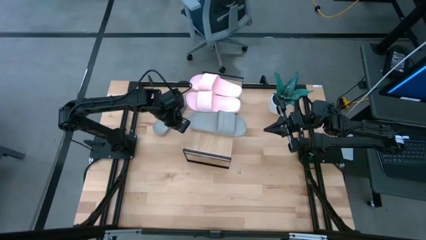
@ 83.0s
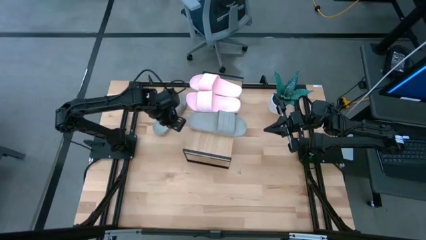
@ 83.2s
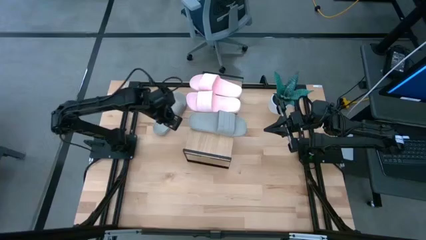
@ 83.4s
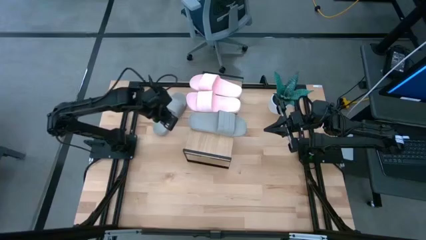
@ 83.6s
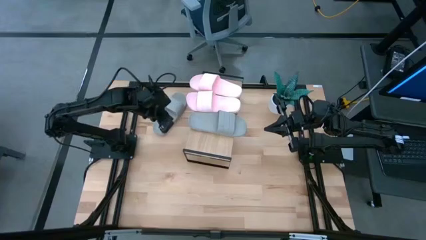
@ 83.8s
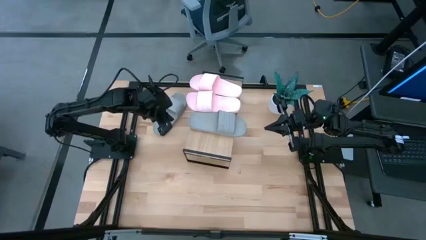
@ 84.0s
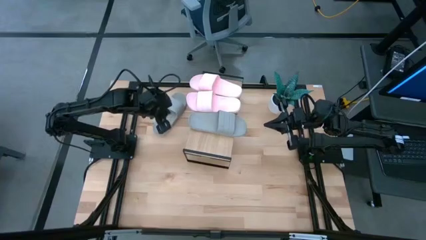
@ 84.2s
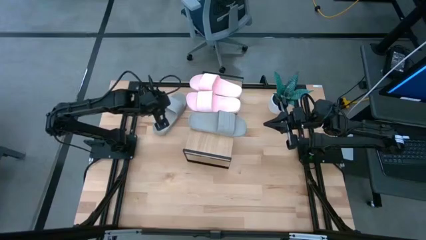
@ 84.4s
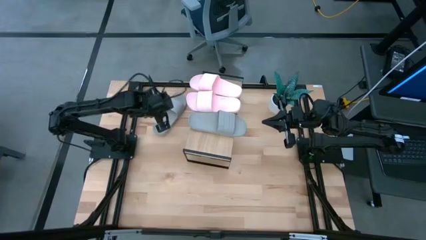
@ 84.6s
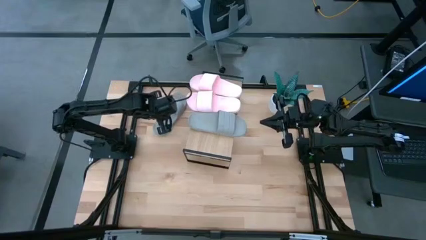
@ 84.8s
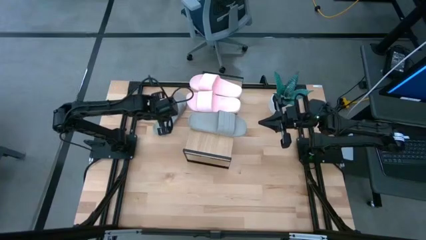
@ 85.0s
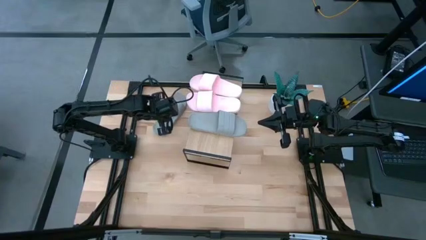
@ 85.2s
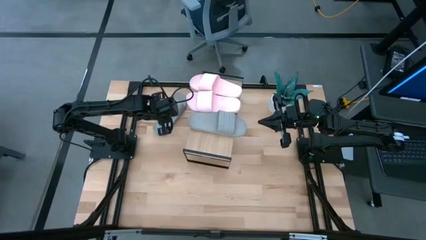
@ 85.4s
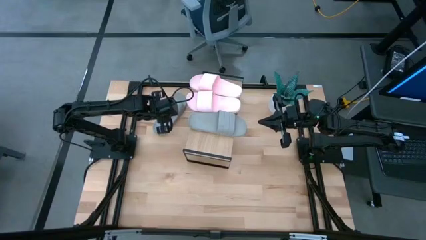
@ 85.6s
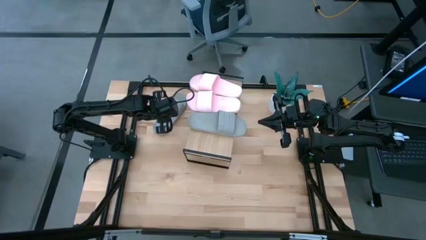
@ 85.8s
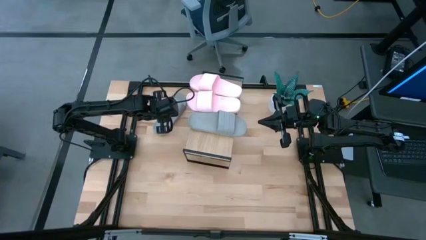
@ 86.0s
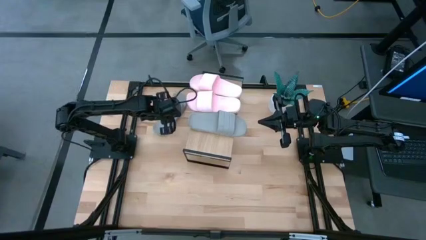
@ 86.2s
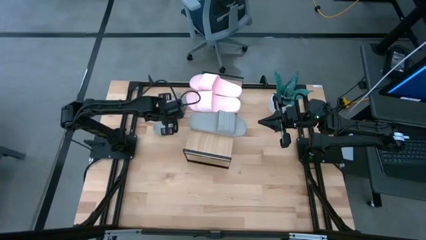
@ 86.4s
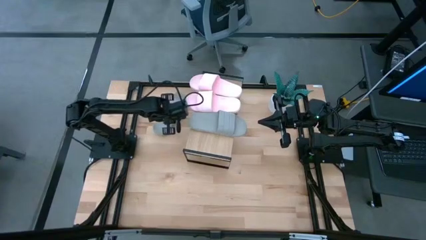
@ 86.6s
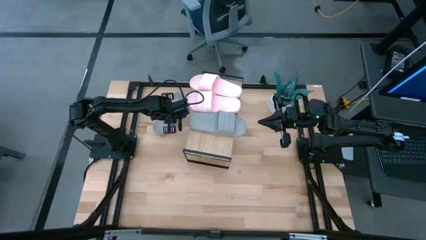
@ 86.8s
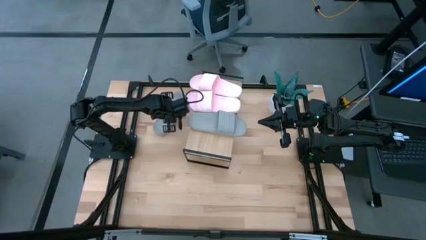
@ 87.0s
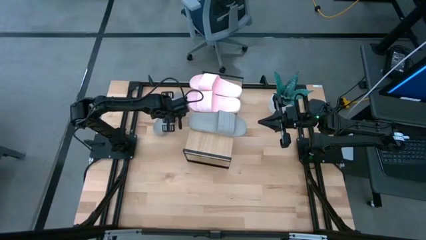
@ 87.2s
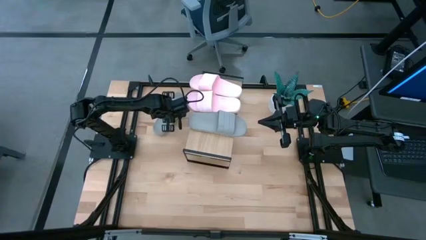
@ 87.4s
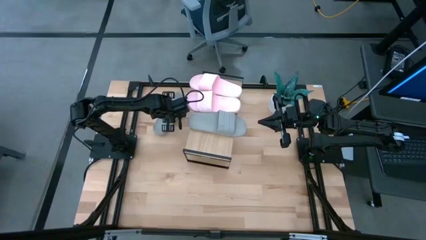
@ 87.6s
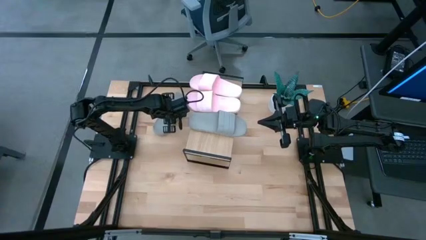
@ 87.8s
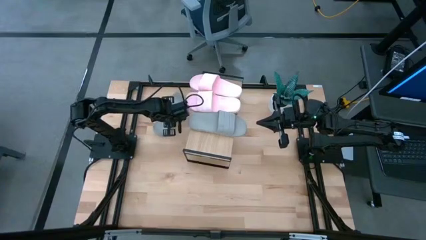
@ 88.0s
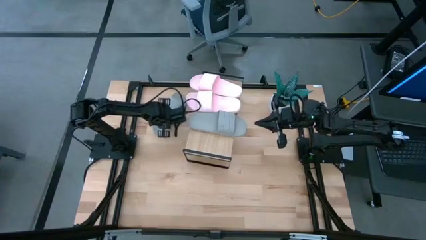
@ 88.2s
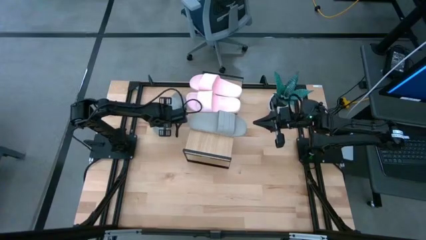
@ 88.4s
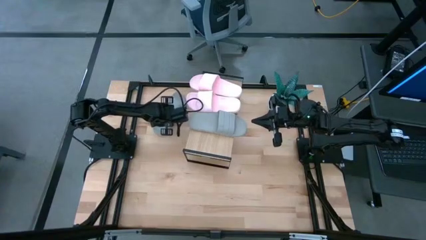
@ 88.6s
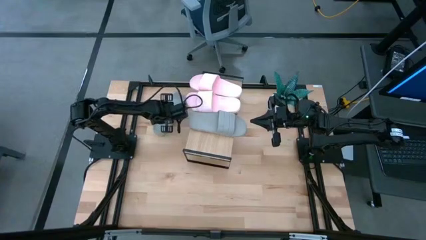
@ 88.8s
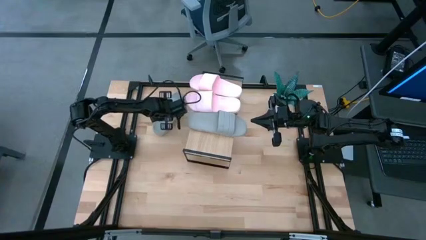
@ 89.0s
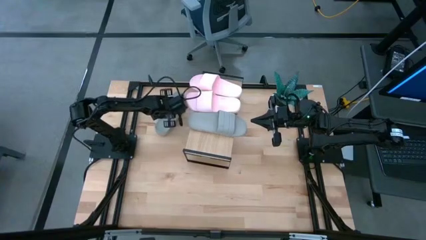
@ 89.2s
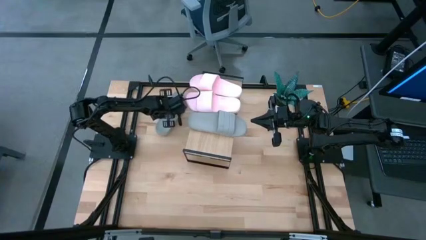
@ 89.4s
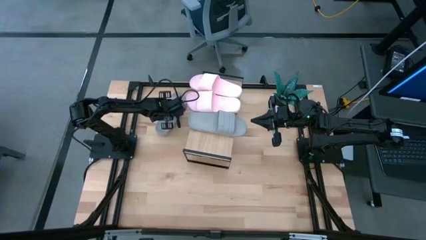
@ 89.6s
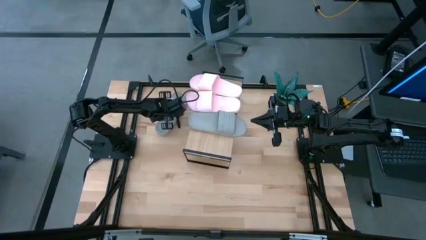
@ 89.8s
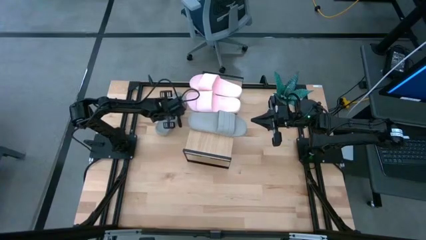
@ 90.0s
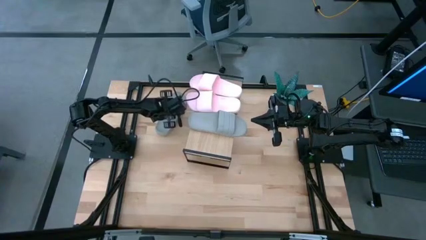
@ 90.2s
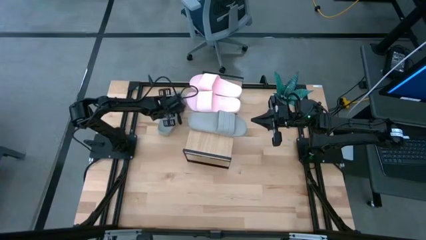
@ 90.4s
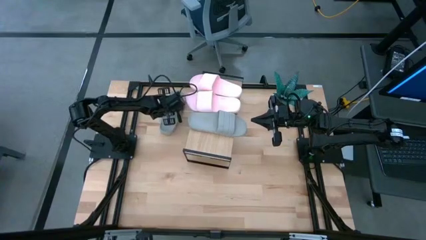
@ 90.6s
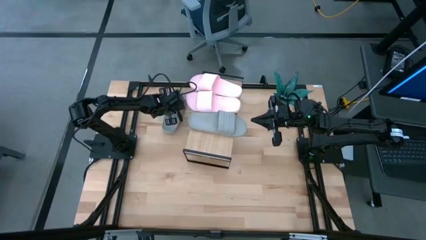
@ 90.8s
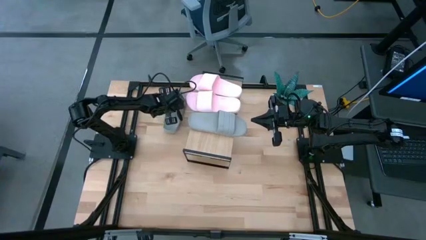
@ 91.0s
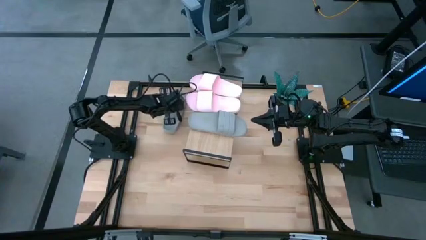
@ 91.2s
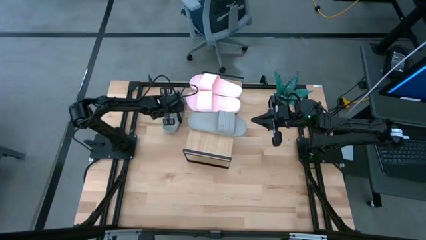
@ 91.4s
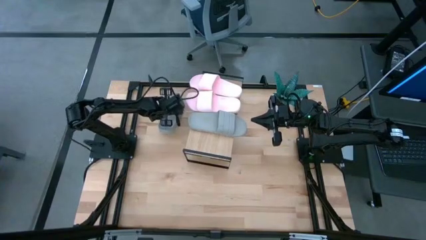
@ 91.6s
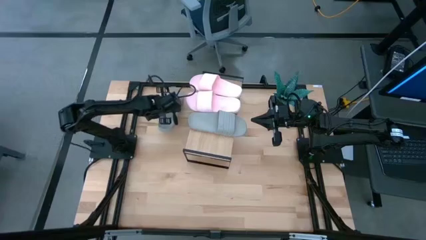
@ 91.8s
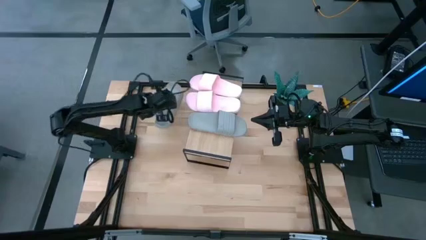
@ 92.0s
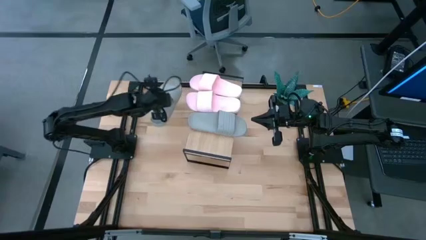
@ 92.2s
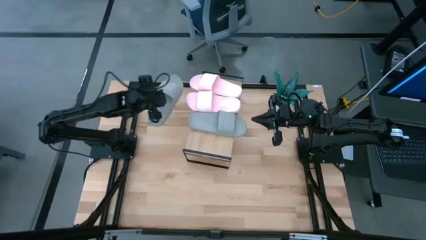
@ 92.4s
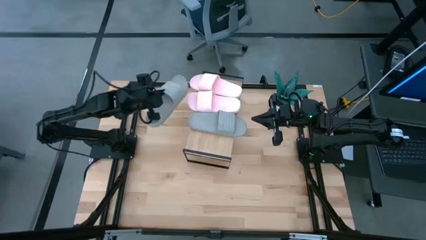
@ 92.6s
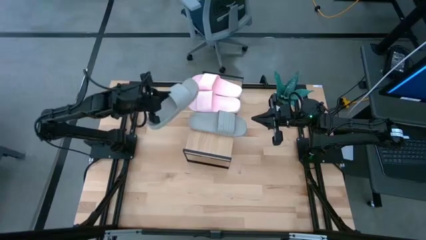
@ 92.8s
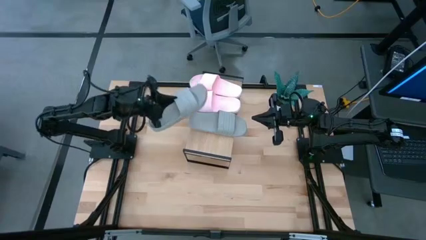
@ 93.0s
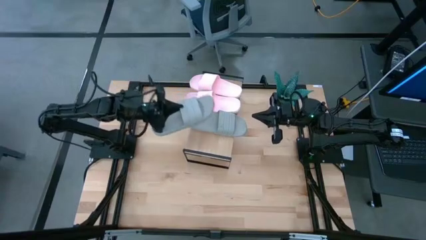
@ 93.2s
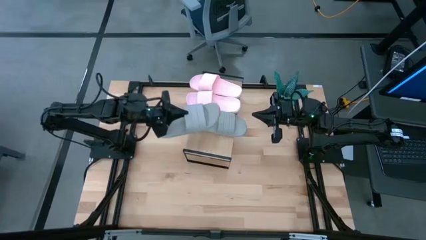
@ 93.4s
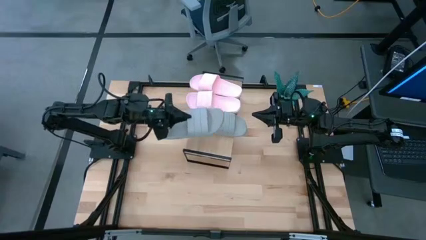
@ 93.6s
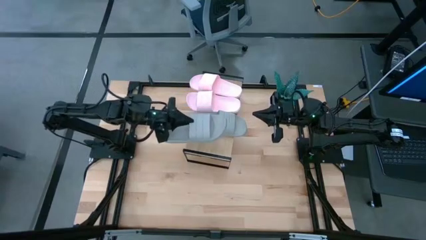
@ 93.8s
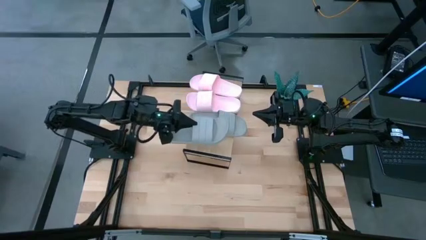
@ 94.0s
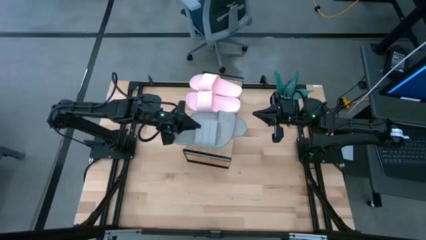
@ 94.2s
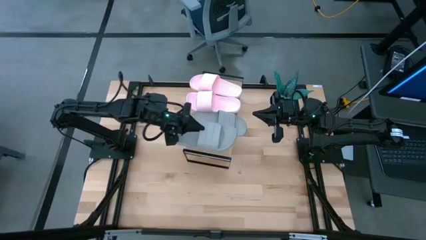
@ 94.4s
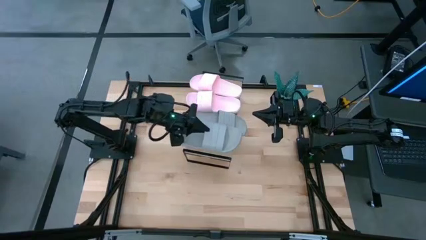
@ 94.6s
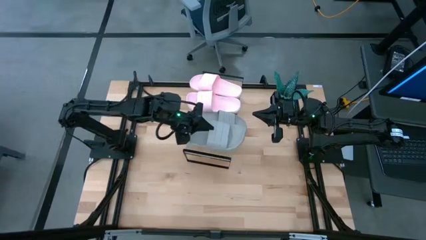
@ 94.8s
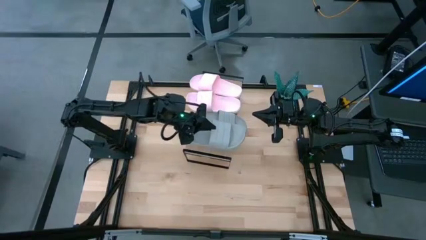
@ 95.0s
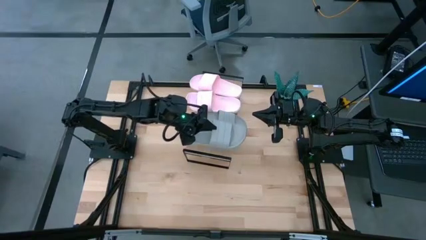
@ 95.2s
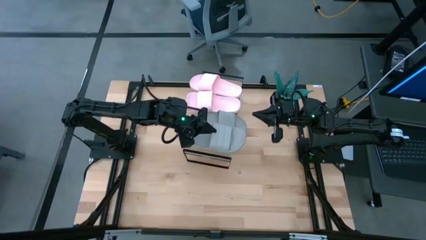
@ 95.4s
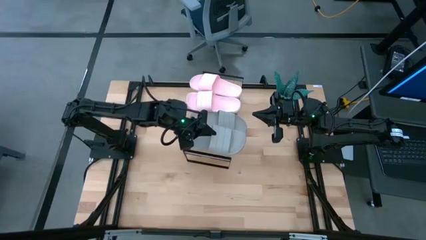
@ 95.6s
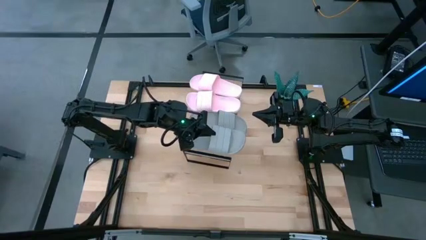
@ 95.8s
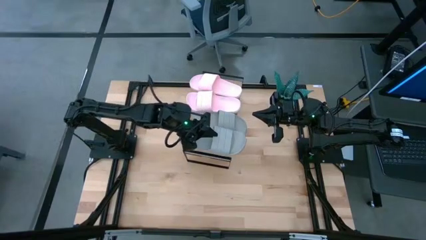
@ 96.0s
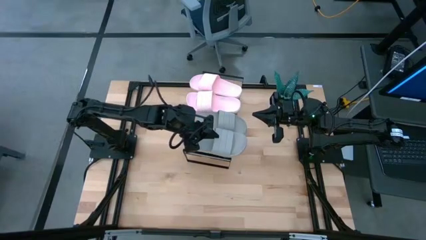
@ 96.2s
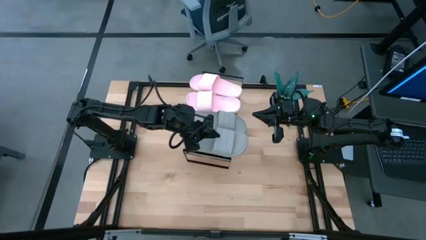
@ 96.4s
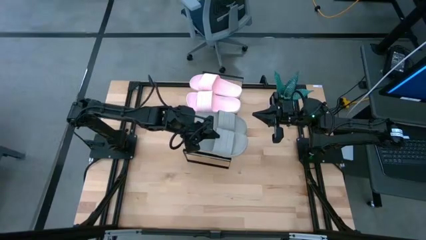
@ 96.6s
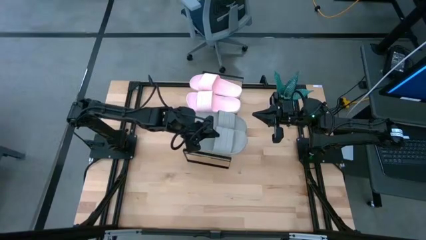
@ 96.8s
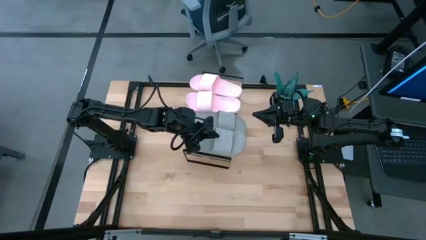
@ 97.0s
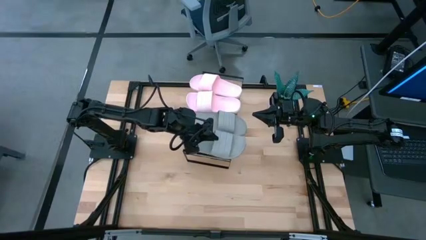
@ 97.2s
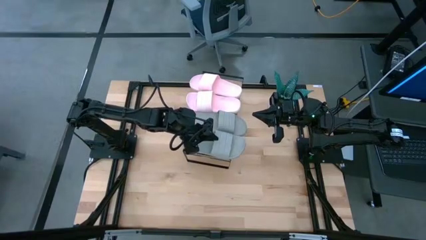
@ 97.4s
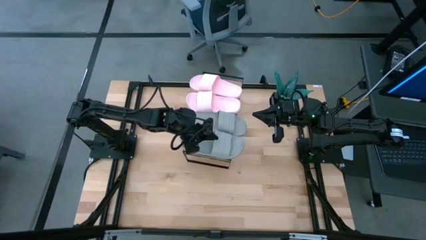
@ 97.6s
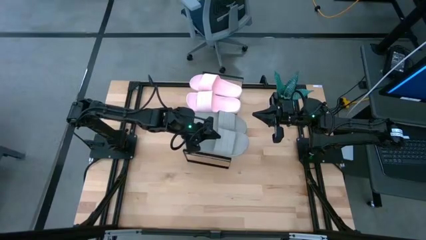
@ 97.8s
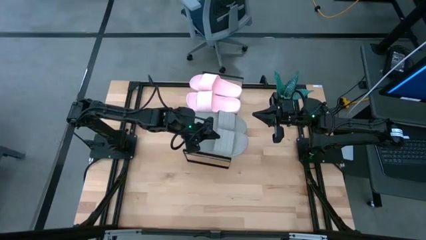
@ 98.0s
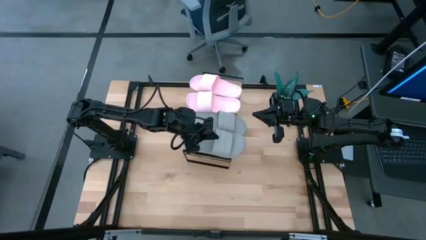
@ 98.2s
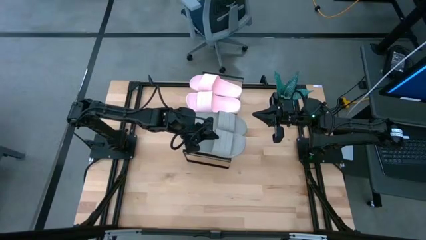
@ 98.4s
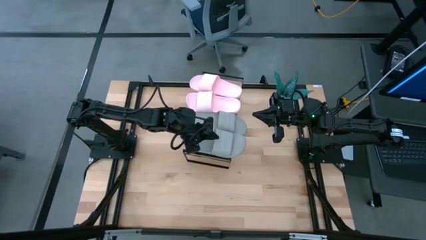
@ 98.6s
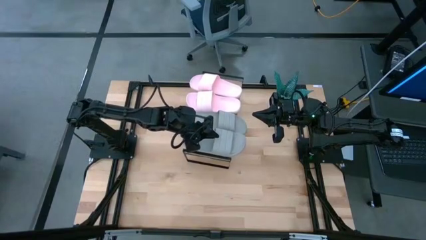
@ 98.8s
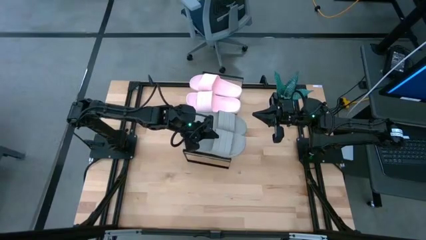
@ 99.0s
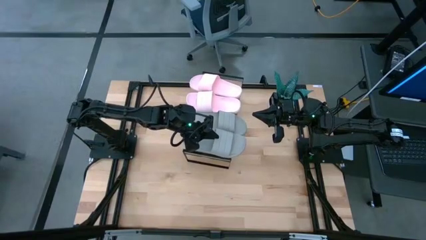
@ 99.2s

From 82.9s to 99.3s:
Task: Pick and place slides into the shelf
Put the gray slipper on the shelf
